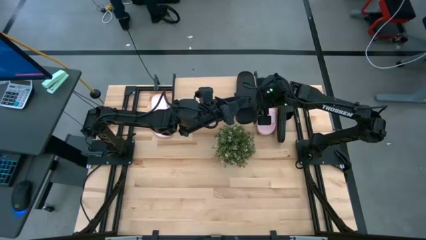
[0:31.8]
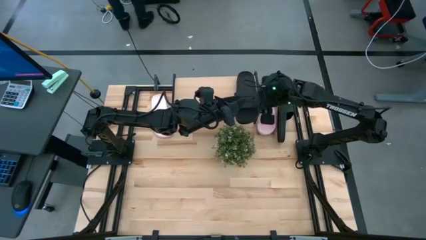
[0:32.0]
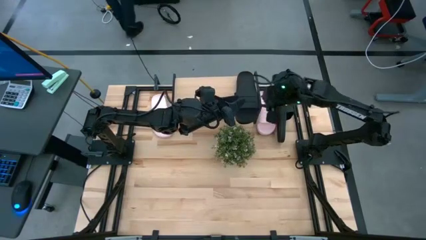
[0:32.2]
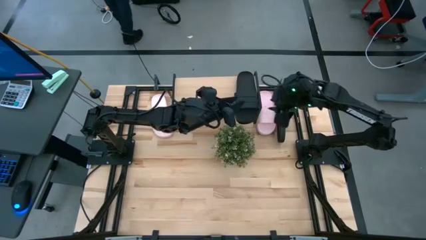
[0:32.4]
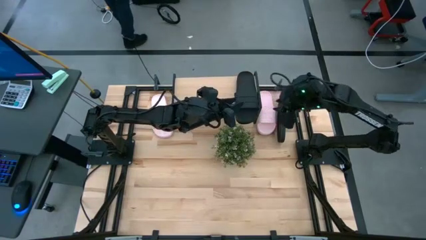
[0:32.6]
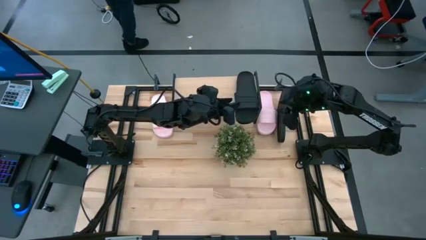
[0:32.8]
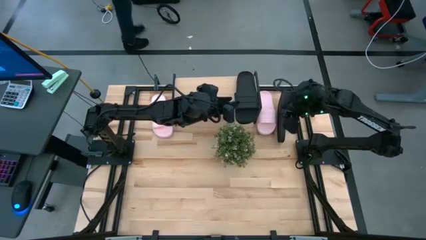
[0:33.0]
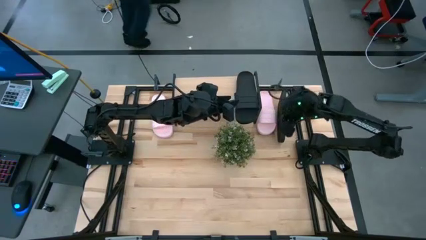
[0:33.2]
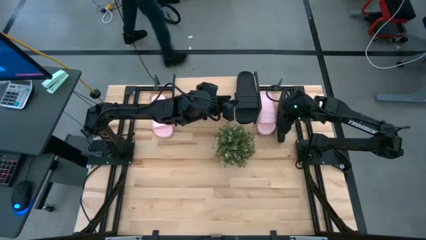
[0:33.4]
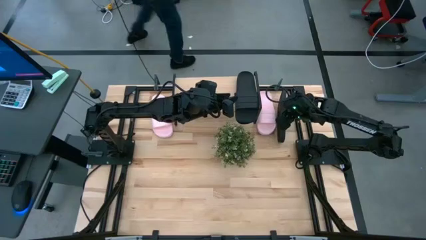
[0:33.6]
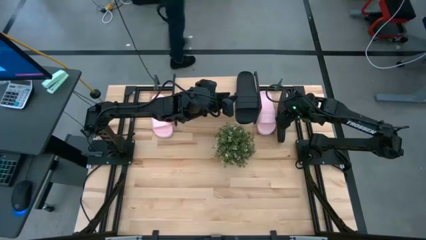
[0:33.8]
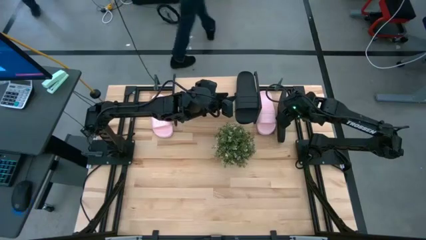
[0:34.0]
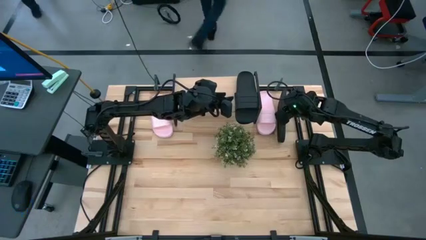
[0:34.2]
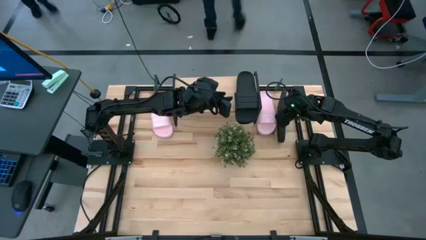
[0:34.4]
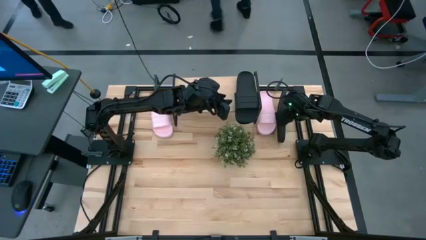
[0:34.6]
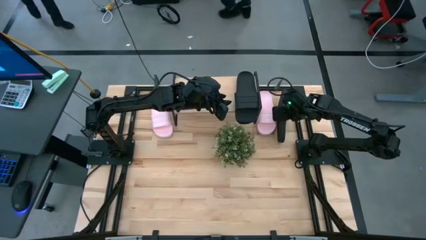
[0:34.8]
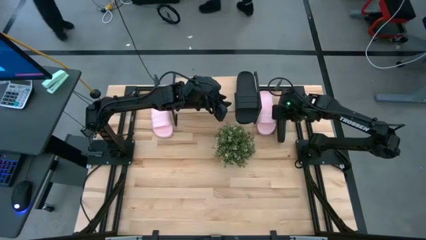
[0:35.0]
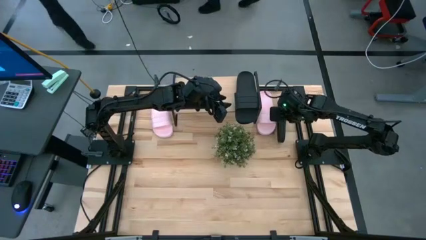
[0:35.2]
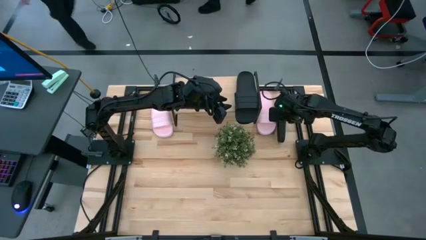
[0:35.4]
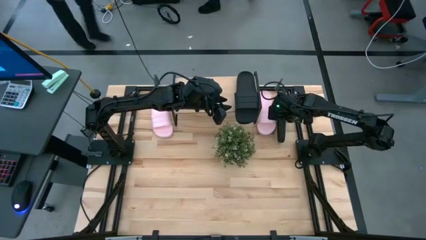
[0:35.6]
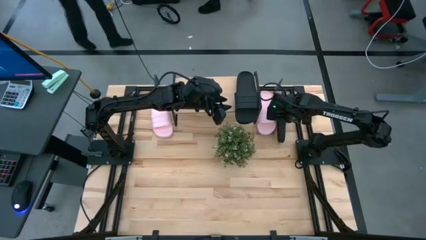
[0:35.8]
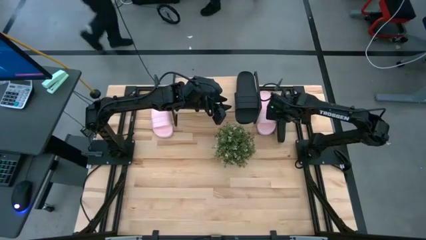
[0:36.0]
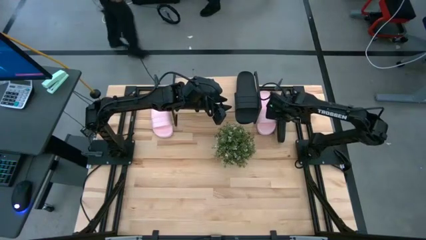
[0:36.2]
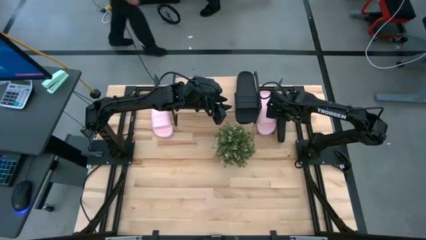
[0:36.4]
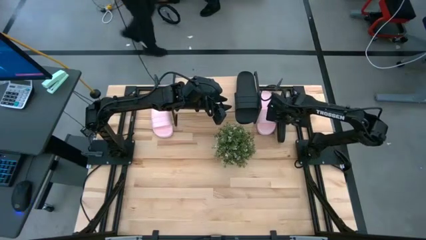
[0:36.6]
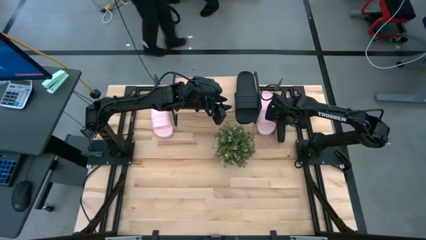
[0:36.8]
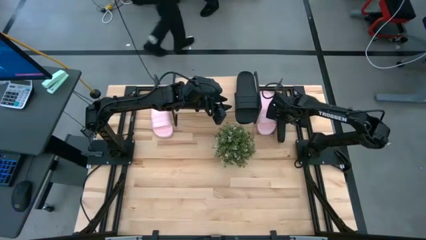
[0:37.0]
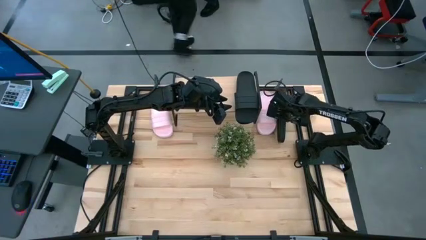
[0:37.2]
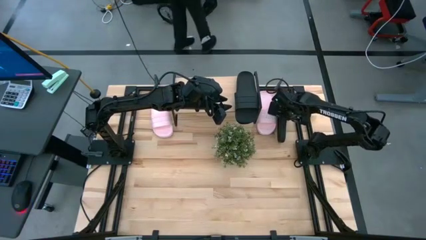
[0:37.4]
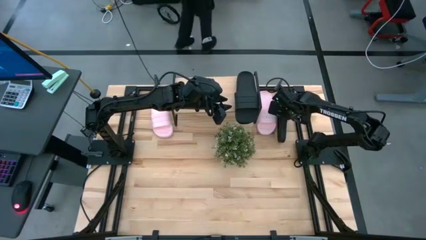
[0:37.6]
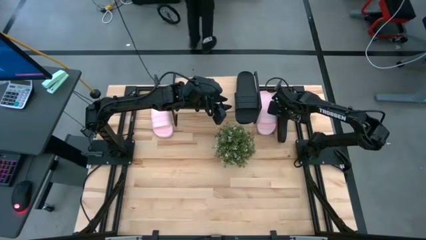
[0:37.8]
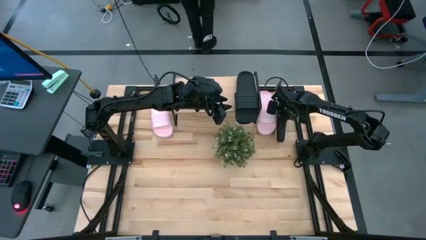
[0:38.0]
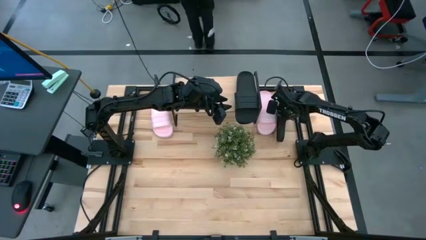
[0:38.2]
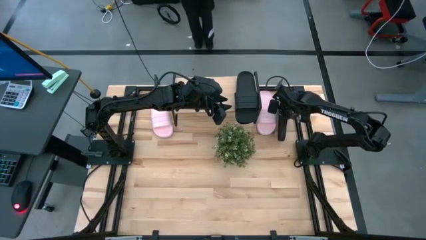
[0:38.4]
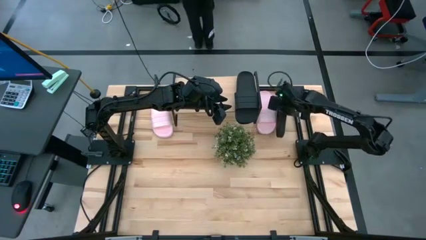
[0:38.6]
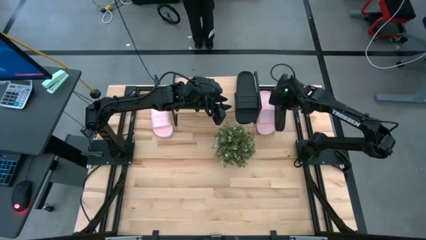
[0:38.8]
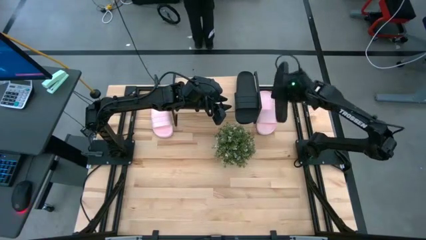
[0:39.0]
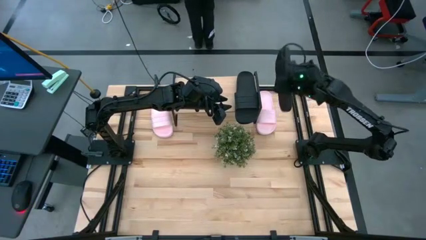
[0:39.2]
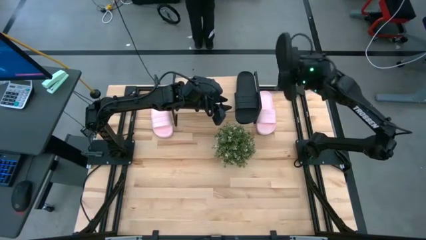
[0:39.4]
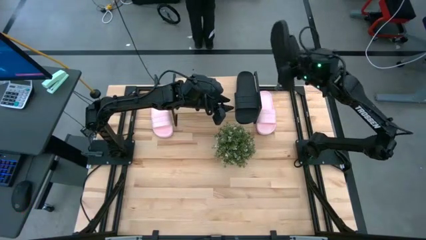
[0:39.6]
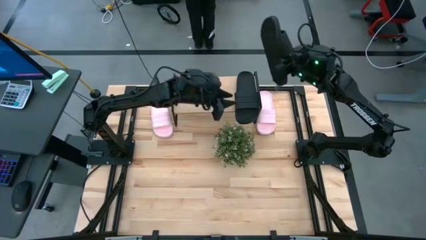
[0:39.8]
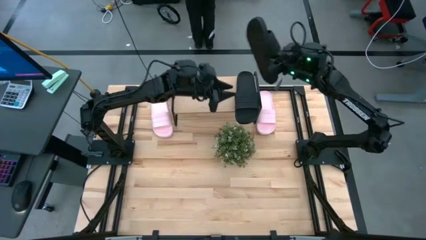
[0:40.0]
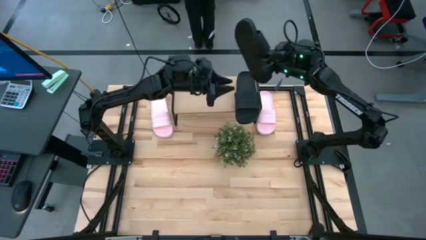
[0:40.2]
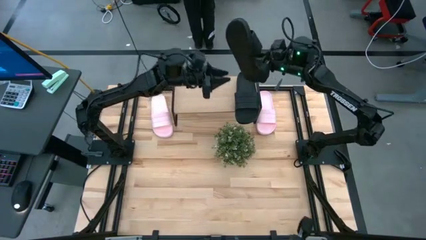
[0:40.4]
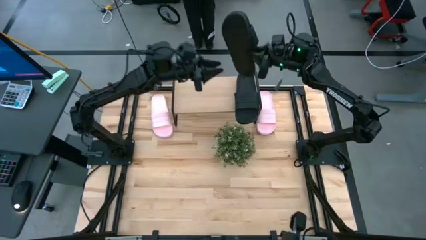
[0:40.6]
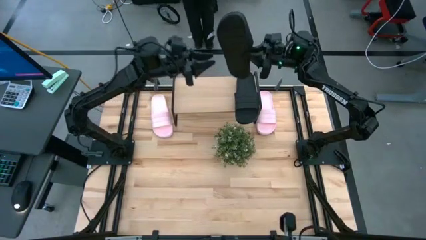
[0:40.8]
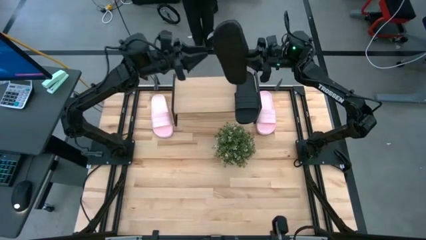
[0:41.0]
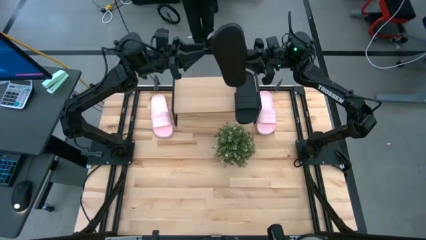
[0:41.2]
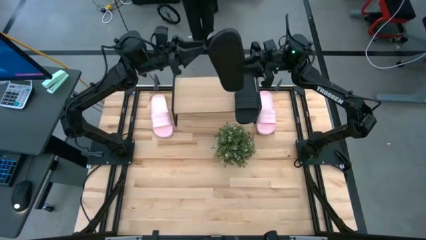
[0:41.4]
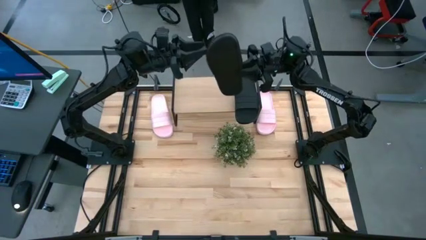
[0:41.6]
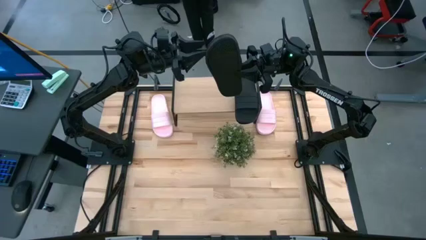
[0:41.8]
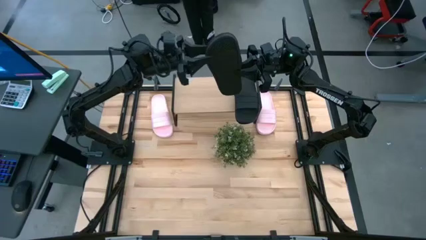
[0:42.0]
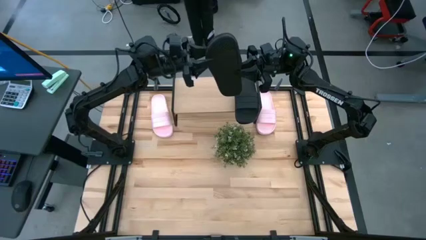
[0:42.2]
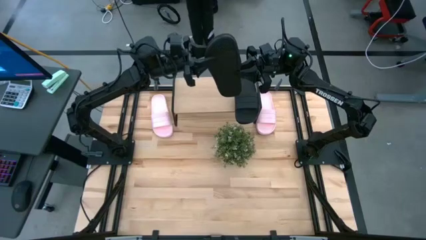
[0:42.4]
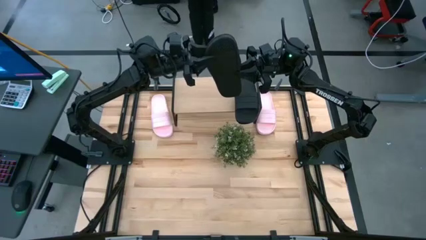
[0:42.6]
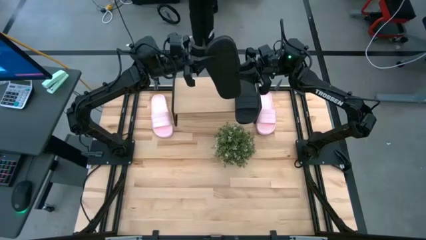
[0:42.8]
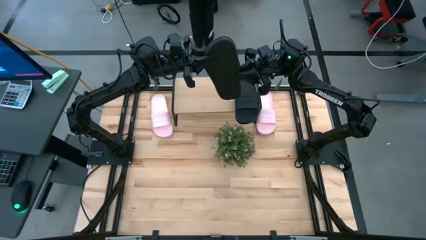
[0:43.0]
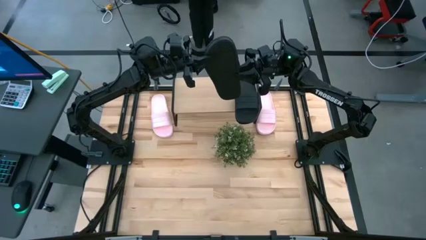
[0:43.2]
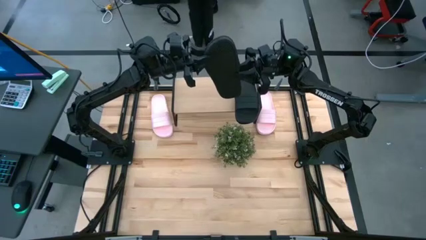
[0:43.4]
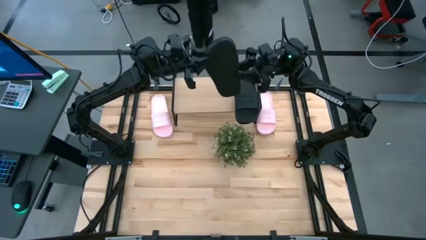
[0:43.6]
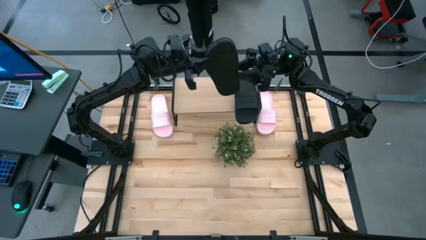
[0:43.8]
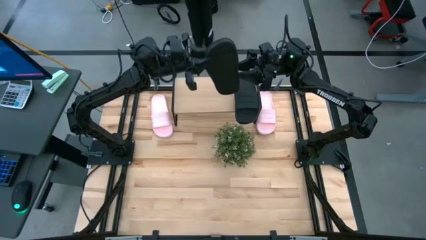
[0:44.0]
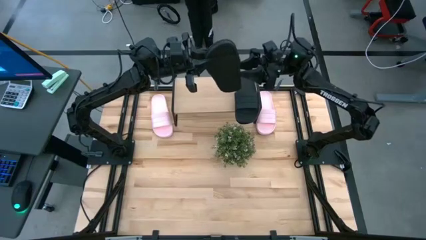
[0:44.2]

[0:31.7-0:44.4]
Task: Pick and place slides into the shelf
Put the black slipper on the shelf
